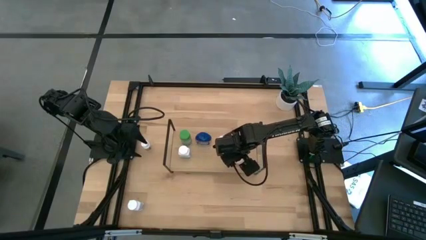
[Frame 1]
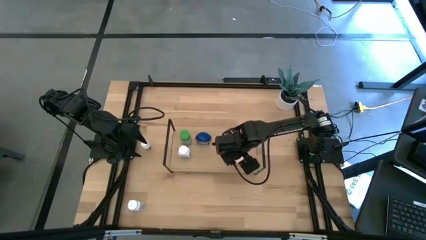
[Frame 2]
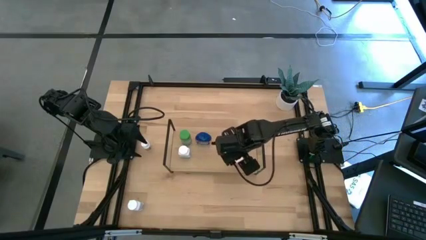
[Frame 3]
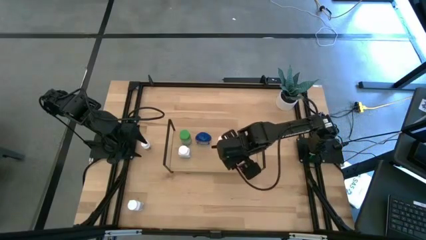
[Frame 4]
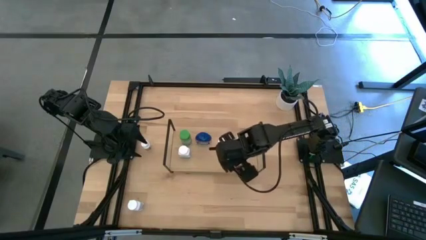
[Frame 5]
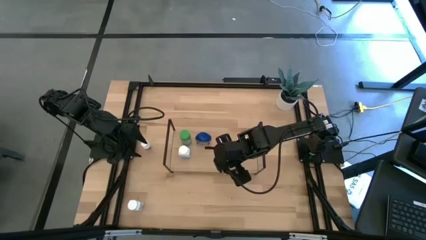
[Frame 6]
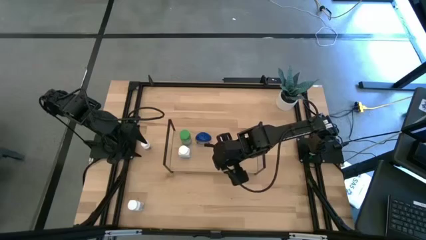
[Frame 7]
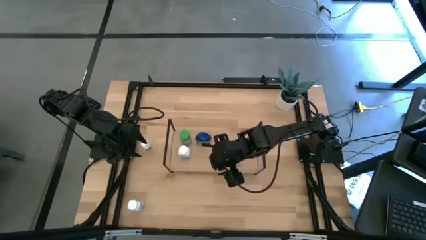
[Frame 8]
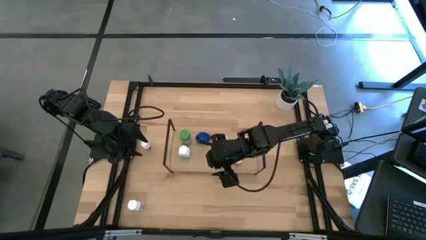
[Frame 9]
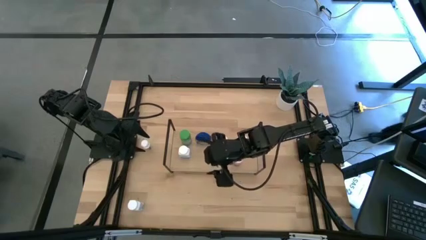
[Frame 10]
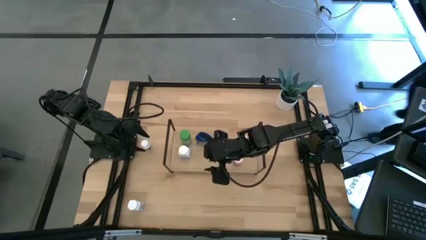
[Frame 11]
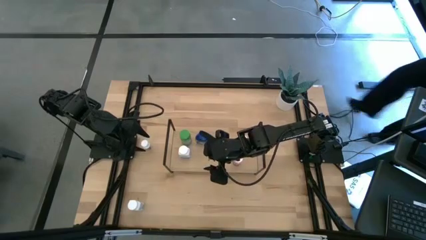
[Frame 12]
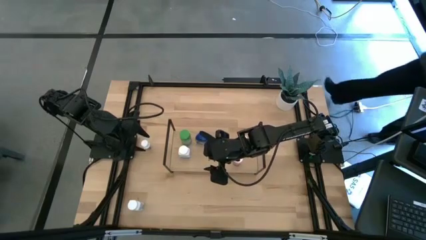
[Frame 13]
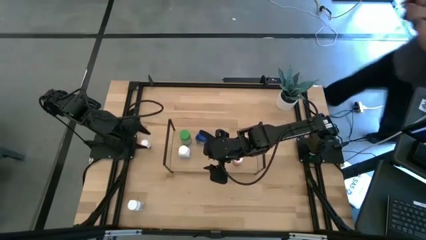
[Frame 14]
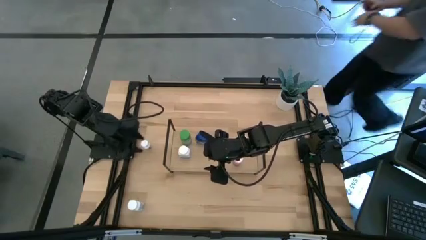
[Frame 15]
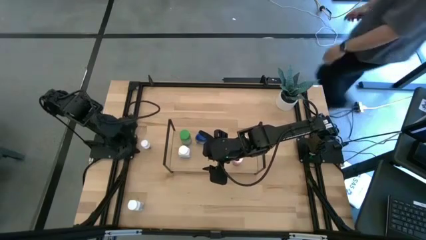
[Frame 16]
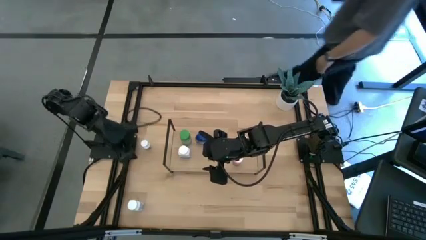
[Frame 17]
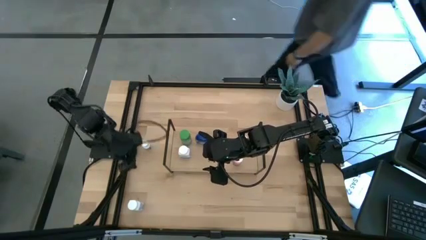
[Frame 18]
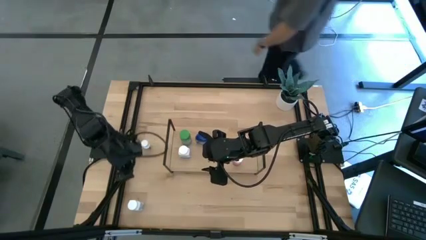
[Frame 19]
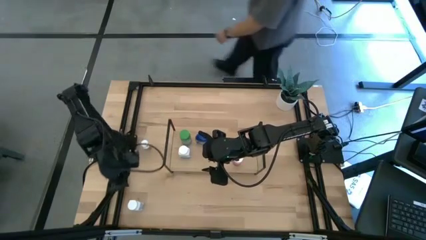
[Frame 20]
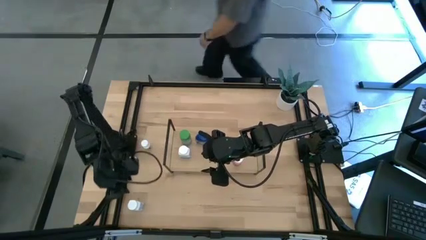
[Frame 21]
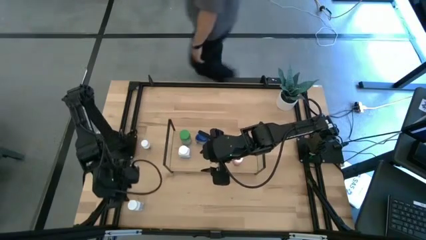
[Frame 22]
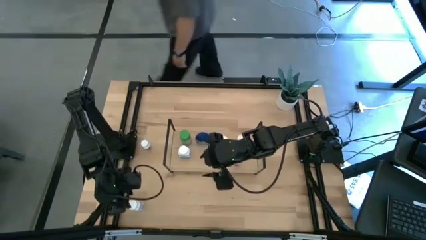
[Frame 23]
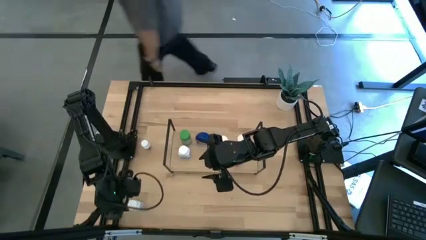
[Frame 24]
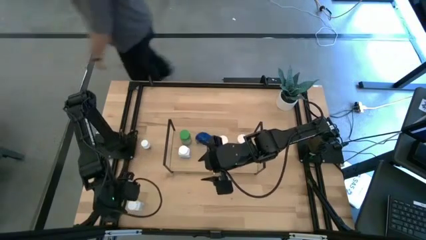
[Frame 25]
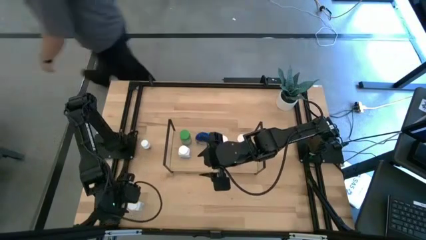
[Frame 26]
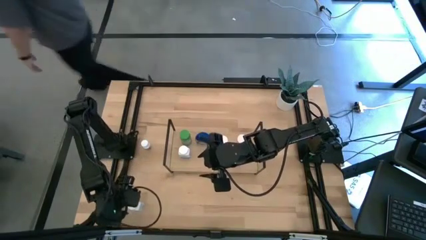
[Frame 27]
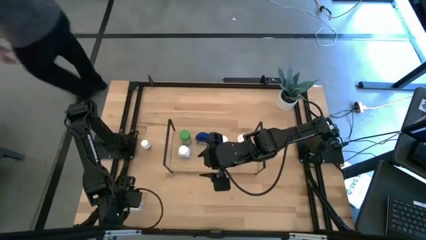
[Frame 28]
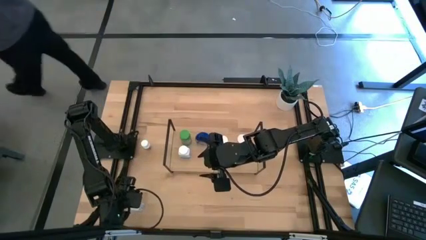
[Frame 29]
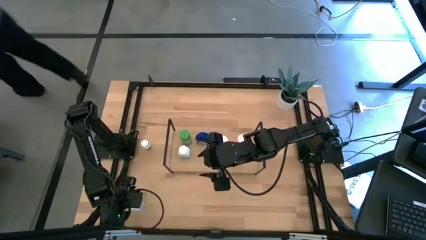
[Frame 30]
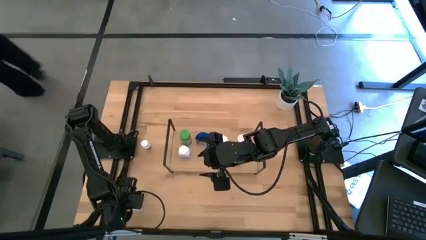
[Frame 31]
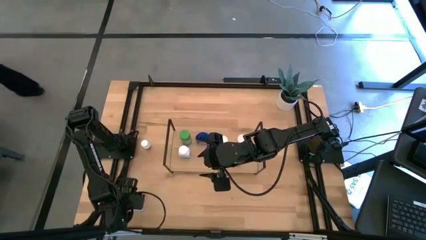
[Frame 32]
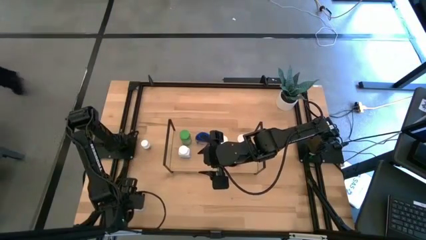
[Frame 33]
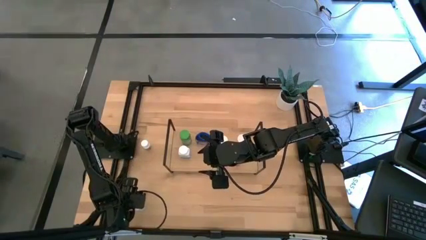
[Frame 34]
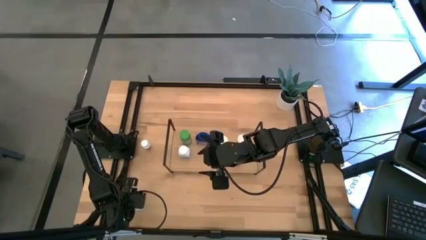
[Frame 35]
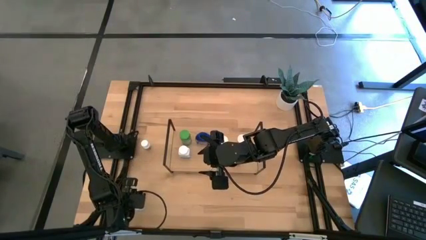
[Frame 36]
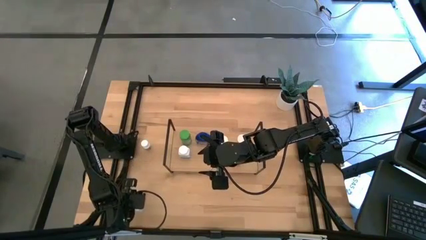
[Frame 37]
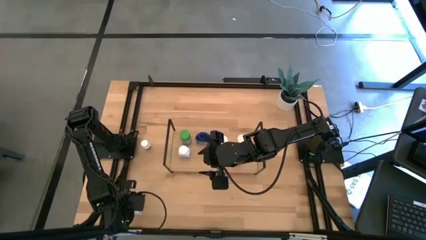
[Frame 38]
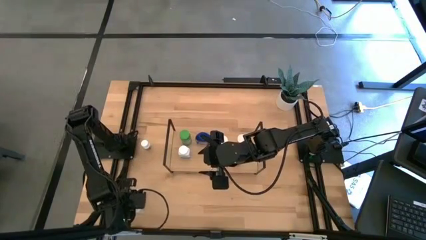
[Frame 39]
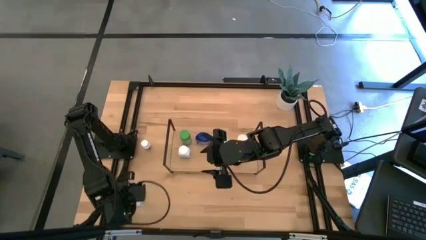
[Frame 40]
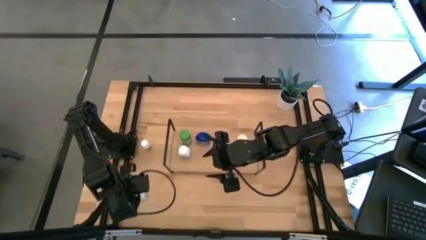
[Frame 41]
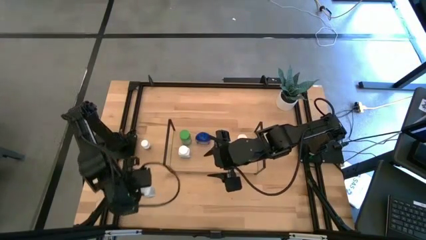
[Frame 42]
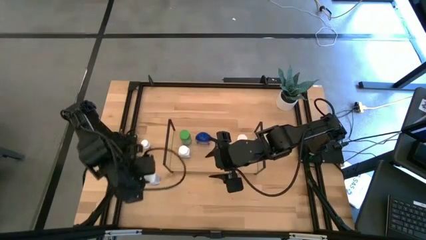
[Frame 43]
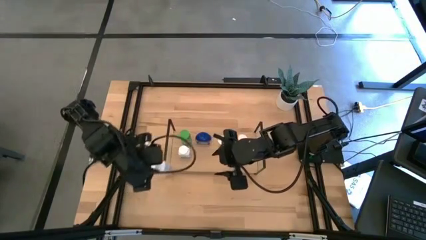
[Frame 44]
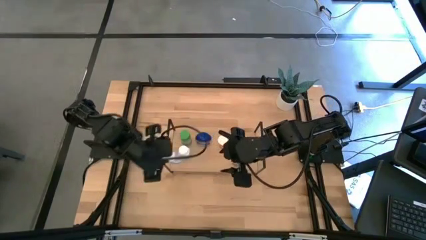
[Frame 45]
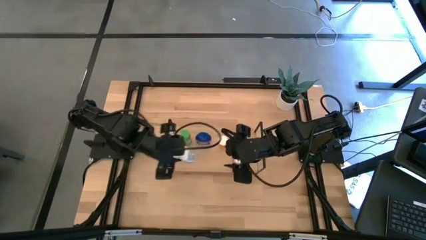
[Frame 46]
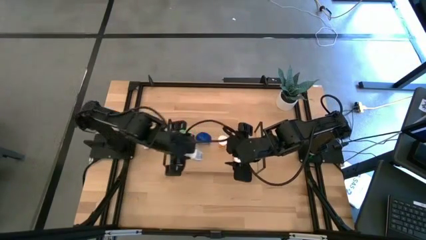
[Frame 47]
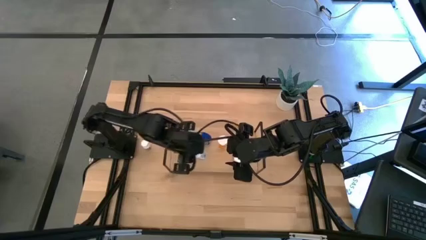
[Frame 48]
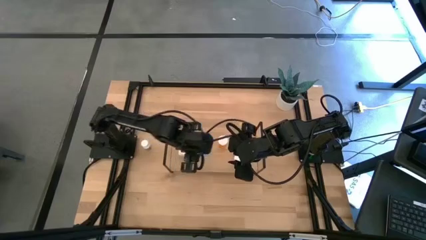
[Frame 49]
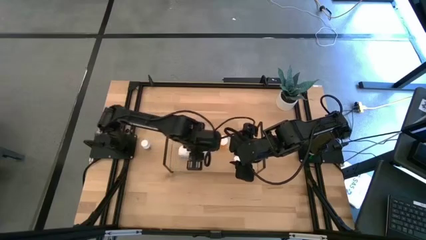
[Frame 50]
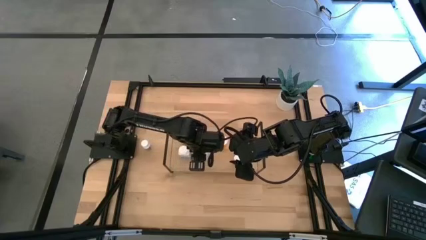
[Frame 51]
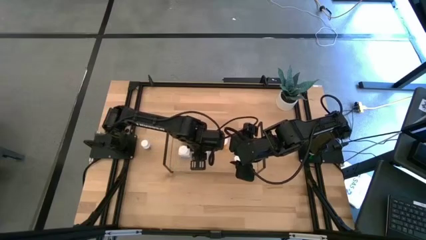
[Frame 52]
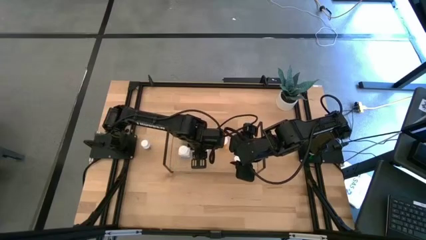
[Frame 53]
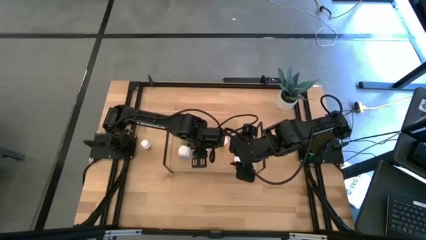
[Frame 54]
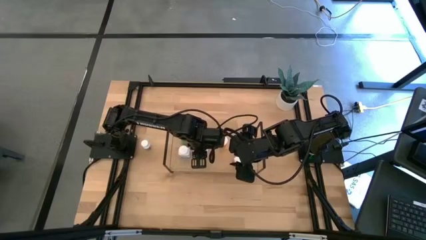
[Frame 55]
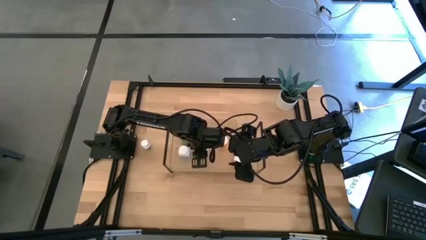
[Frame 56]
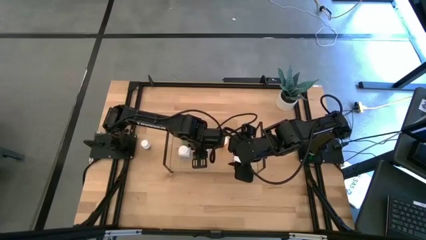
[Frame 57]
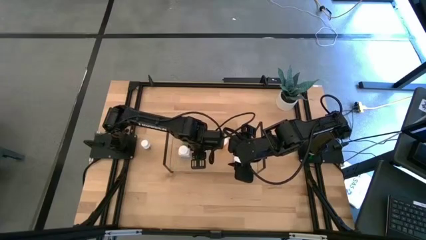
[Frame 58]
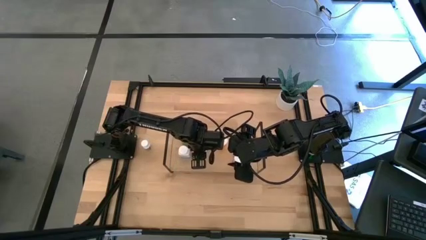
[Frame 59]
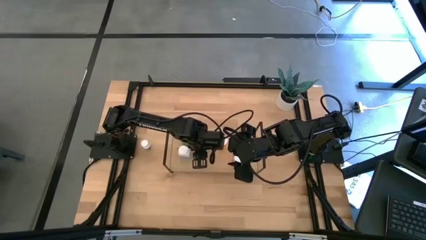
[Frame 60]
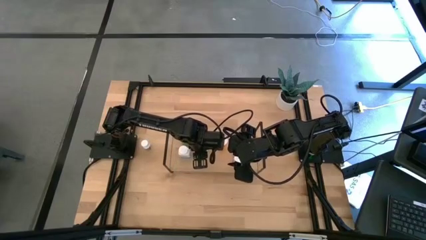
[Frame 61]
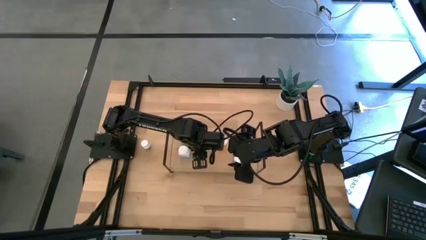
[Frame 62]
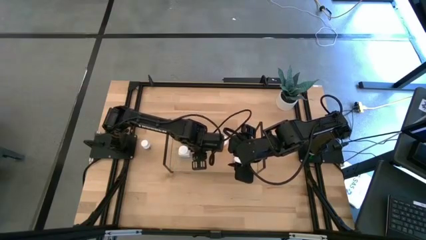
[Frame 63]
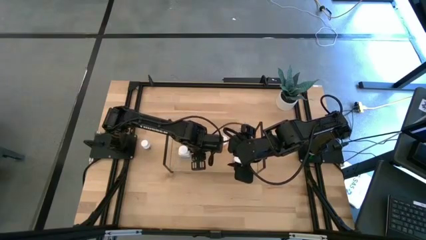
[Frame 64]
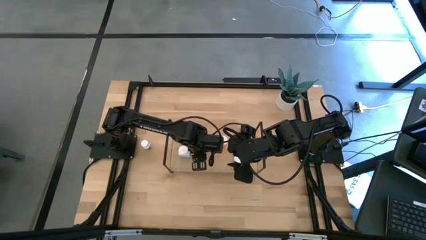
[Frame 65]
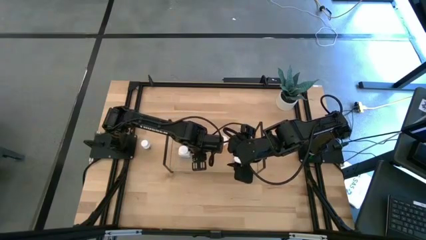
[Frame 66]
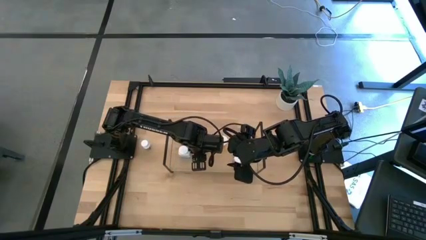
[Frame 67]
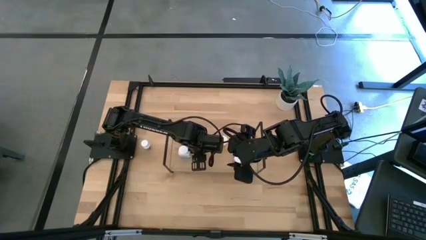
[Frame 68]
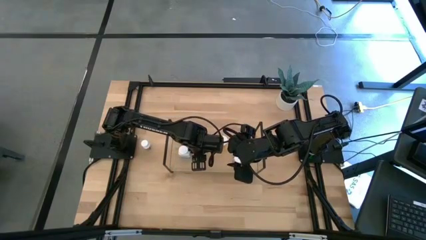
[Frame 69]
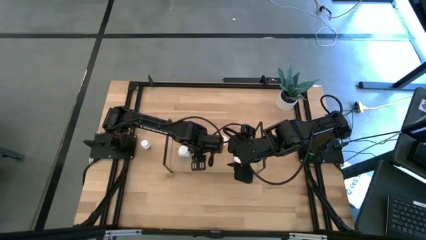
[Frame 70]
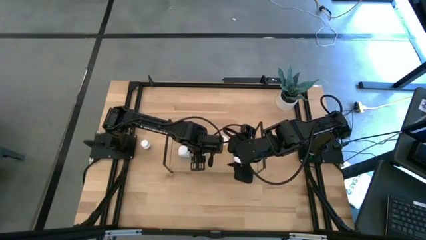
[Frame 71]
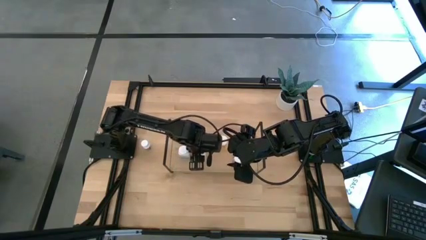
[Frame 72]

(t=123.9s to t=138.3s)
Task: Pick and place medicine bottles onto shelf by color
Put the big white pill bottle on the shelf
